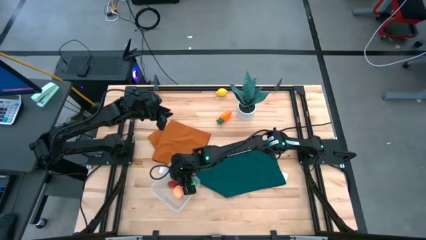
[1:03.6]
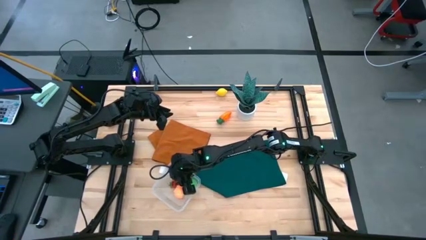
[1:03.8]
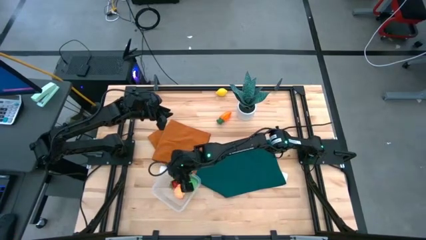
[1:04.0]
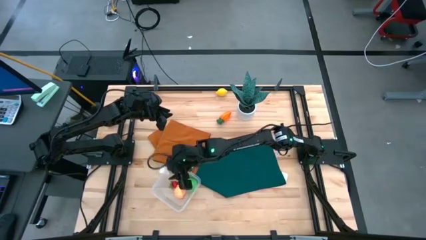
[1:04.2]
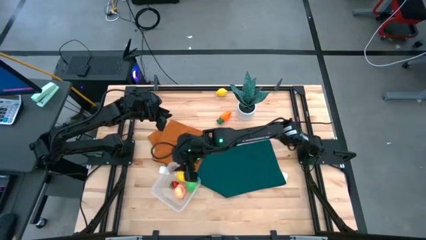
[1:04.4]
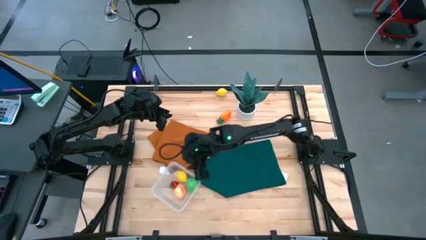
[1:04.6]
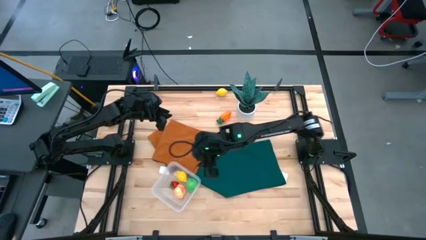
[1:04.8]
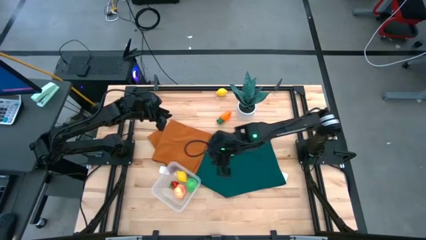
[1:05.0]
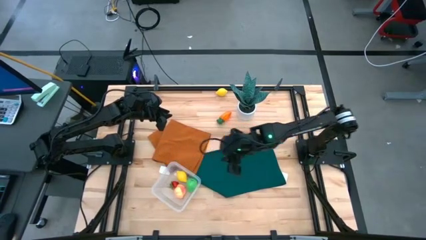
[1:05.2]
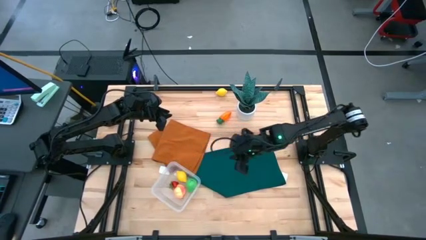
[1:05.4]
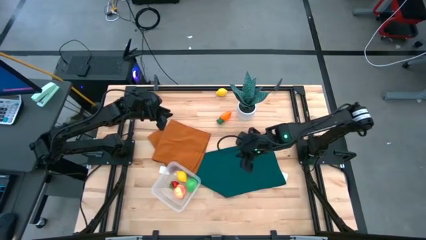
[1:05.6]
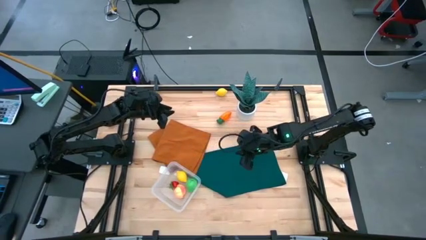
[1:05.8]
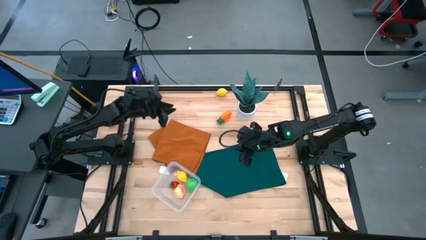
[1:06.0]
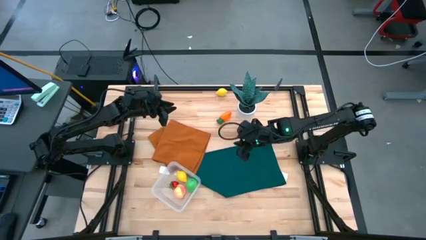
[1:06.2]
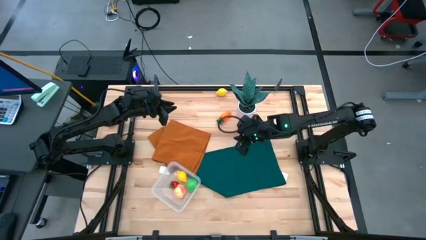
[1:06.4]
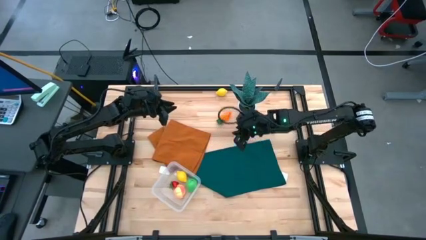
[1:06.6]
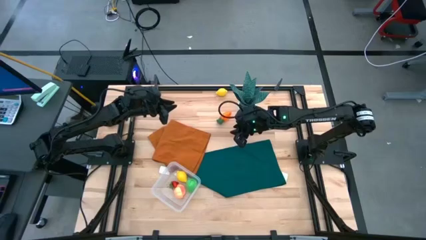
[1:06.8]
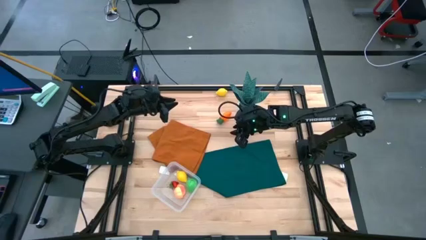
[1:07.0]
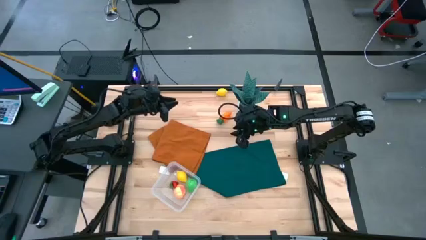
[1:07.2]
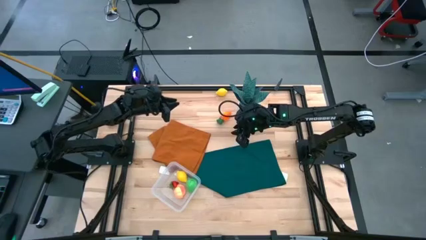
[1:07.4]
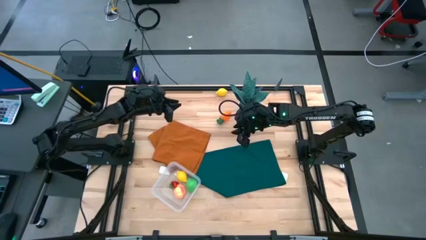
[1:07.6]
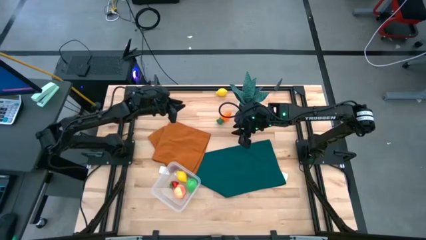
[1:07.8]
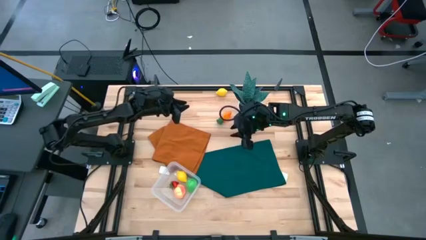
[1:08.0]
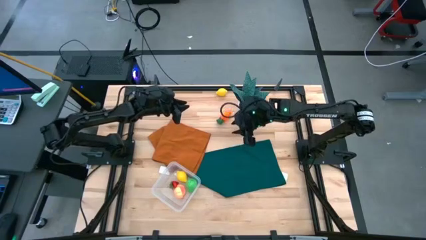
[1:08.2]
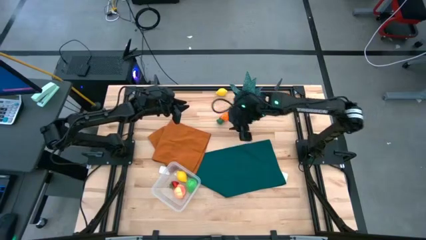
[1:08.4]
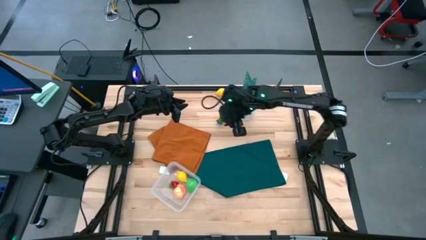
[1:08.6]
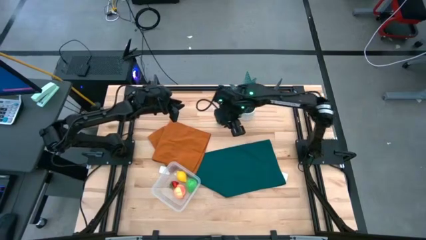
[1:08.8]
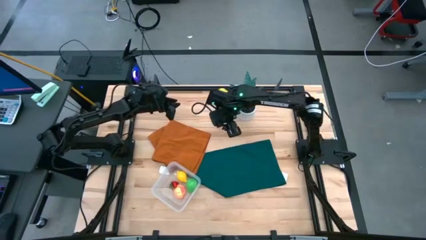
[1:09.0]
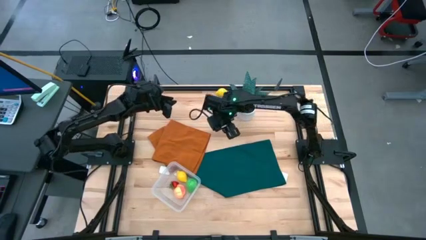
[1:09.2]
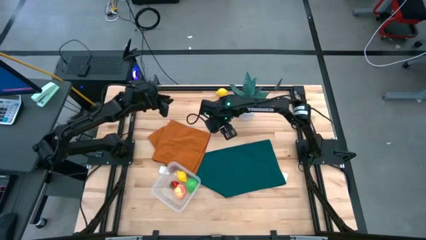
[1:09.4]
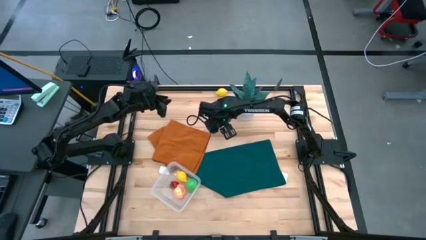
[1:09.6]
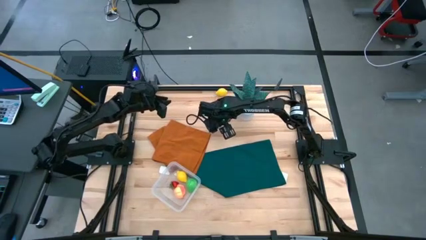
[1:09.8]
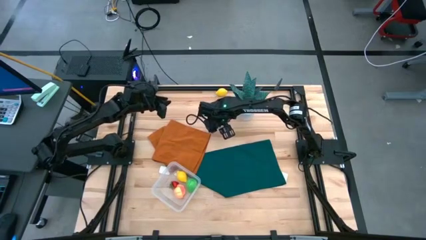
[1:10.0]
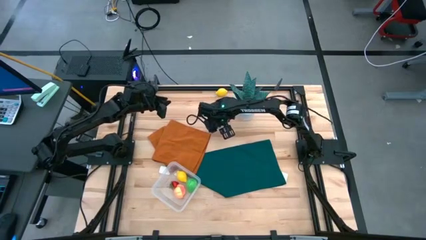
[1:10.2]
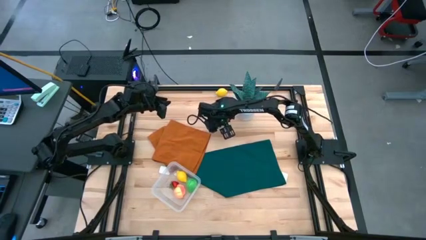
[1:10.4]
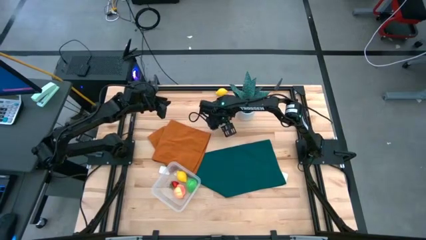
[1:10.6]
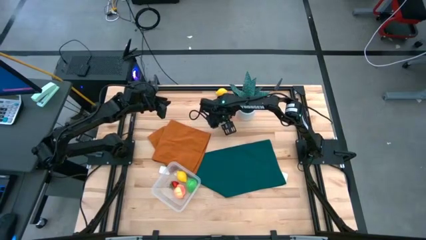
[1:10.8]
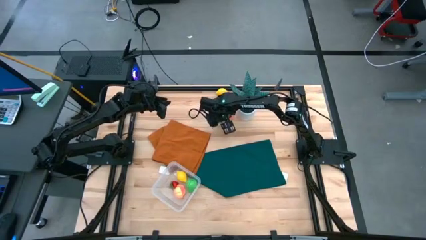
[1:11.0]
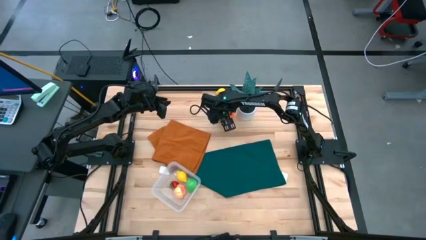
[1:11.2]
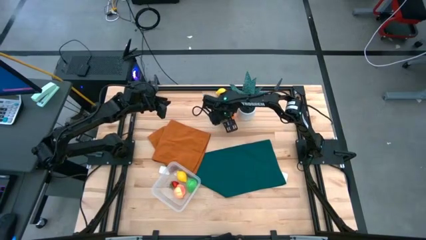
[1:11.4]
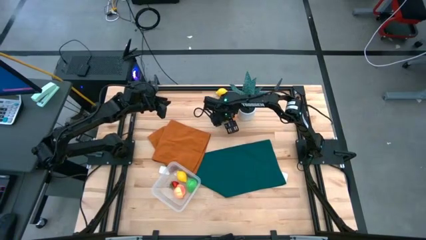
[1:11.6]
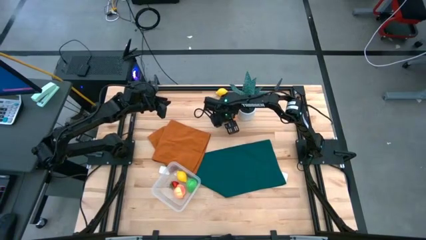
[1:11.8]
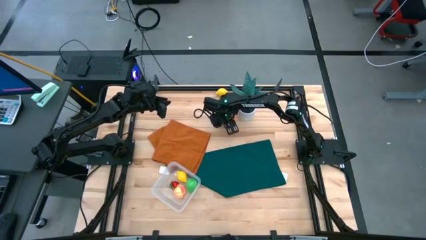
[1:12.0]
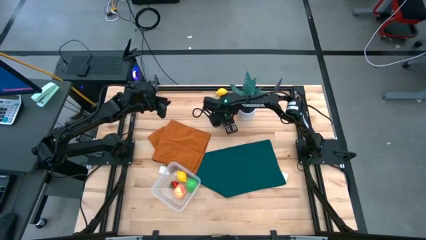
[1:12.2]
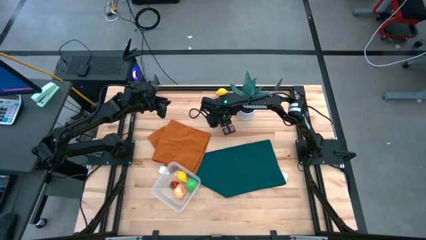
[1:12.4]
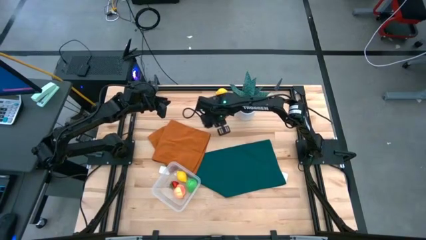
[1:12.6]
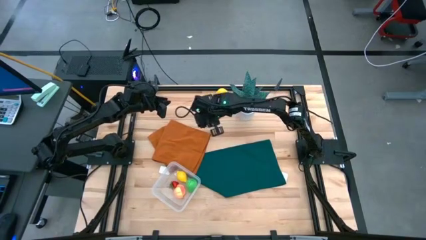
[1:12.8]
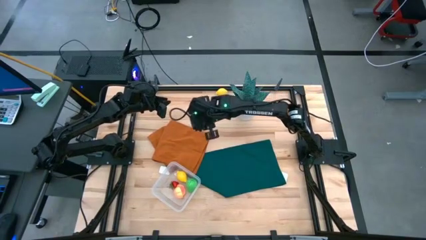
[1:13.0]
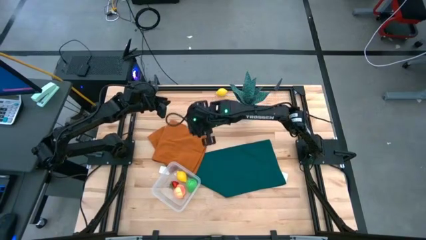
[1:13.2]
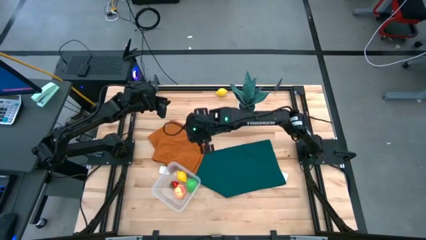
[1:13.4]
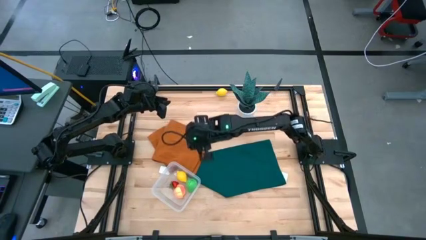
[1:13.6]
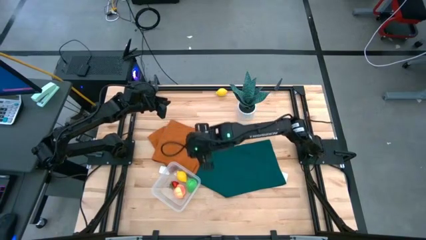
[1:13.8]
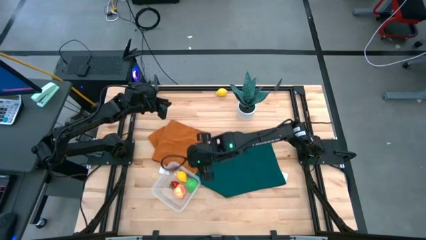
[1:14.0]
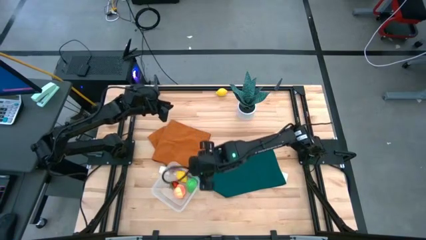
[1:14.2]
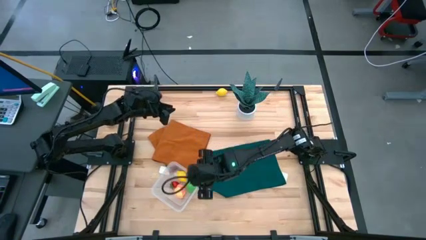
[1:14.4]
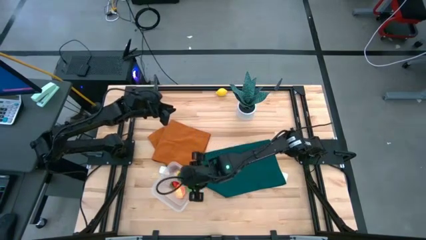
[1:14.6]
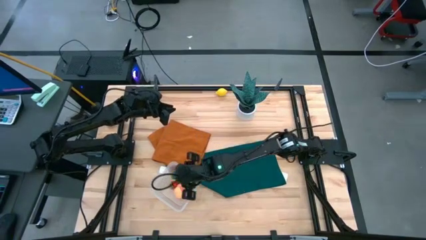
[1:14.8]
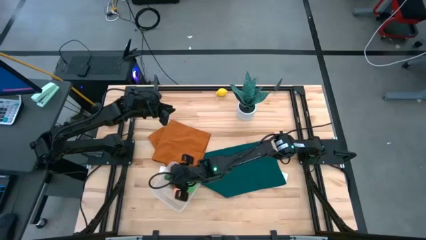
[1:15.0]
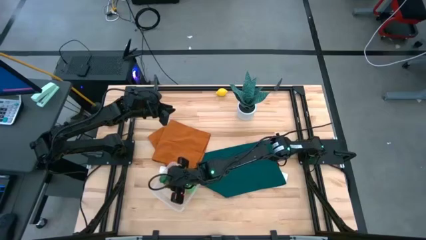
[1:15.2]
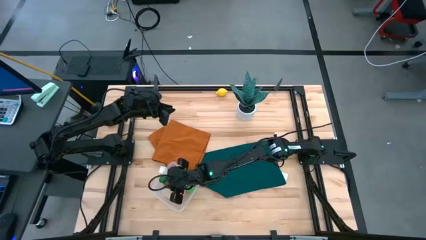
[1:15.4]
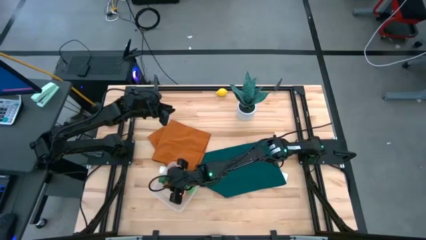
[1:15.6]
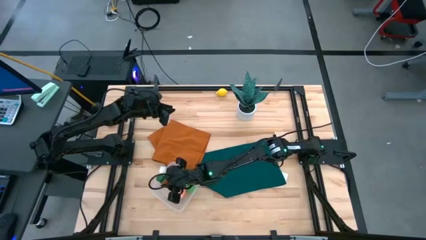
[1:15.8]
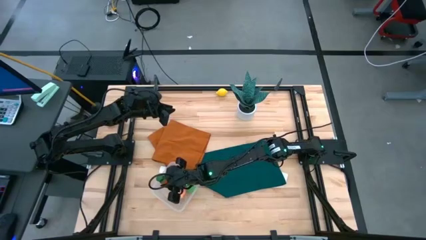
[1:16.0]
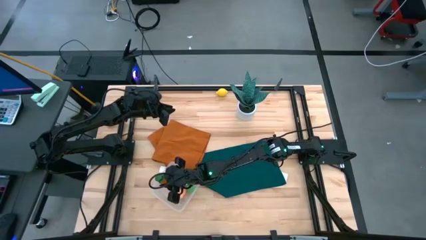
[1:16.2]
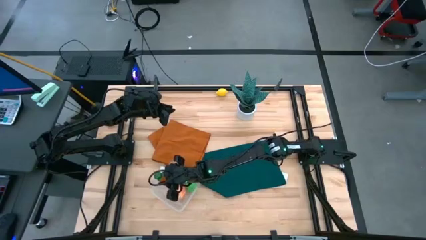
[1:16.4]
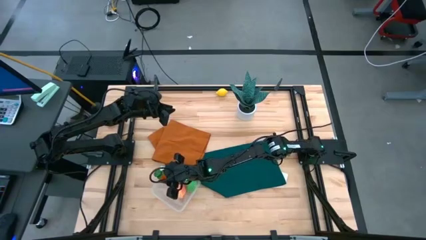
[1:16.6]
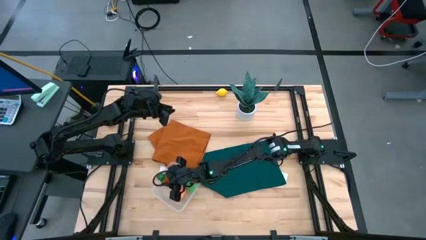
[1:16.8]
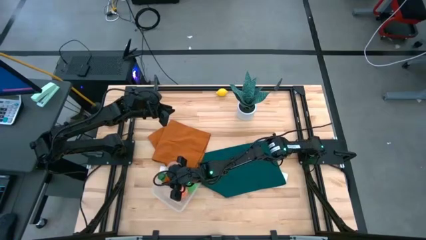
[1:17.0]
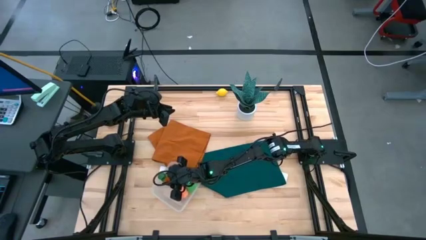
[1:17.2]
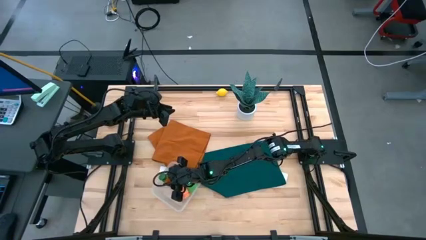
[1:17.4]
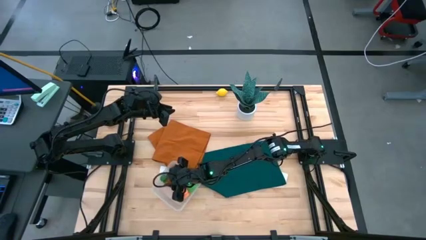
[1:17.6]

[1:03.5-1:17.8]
Task: Pick and placing Produce into tupperware
Put the carrot into the transparent container
